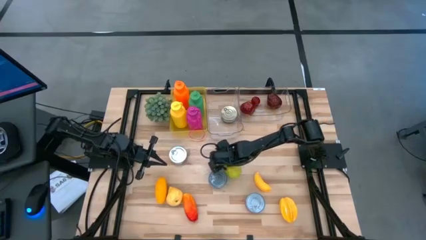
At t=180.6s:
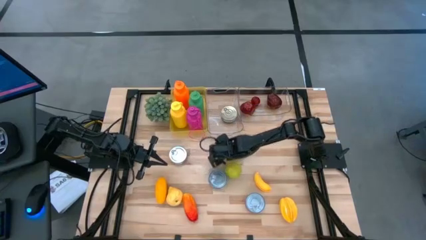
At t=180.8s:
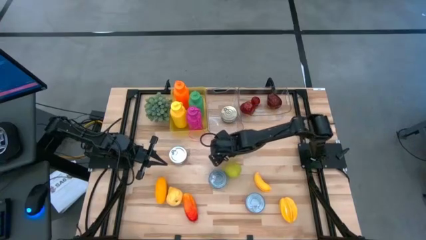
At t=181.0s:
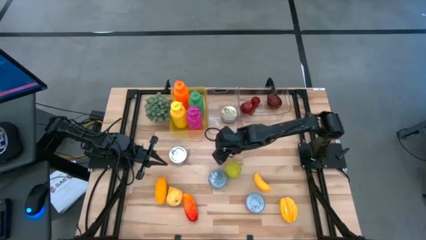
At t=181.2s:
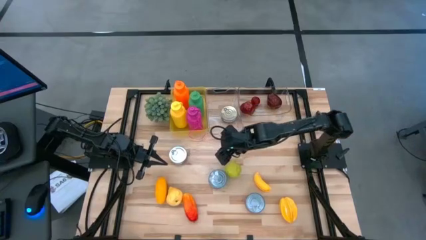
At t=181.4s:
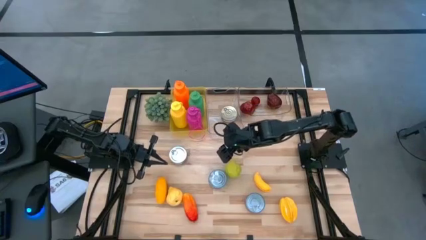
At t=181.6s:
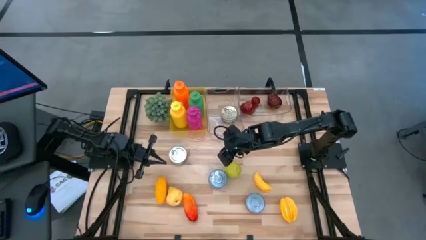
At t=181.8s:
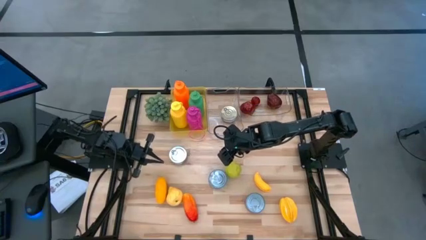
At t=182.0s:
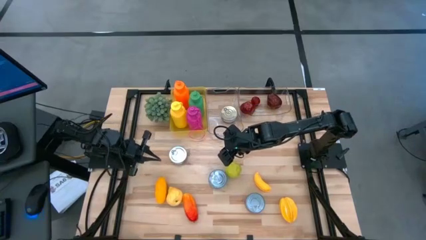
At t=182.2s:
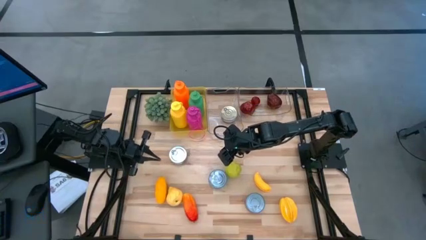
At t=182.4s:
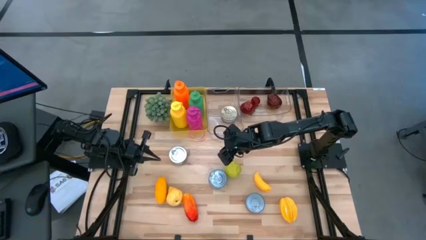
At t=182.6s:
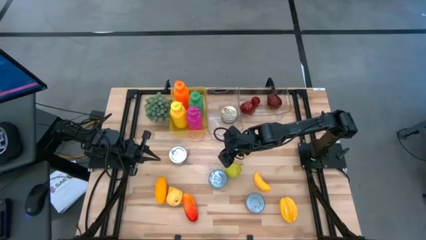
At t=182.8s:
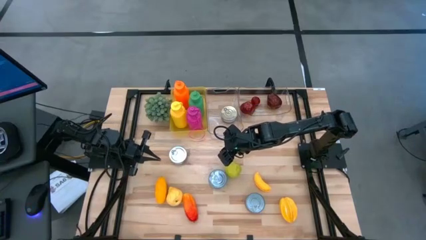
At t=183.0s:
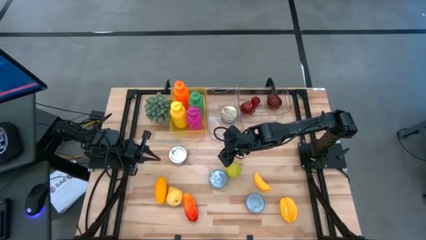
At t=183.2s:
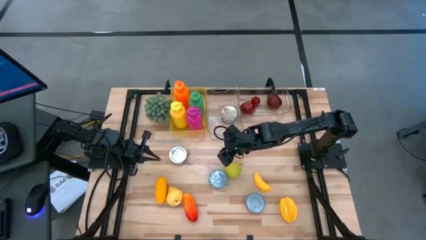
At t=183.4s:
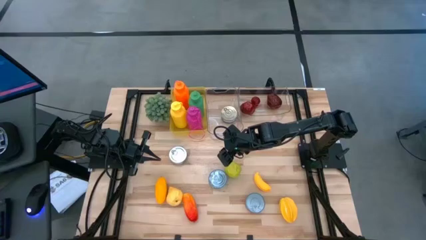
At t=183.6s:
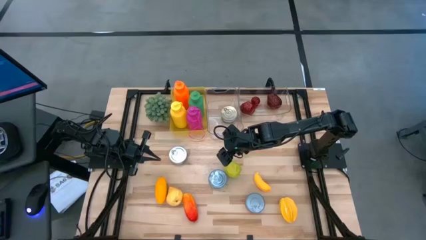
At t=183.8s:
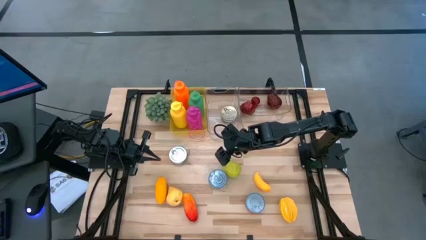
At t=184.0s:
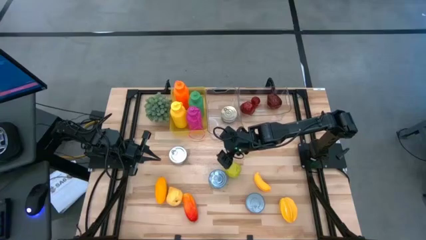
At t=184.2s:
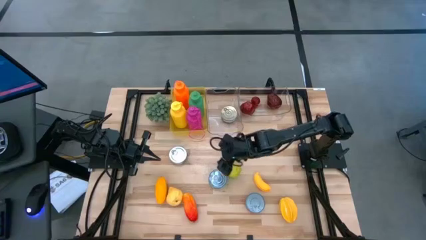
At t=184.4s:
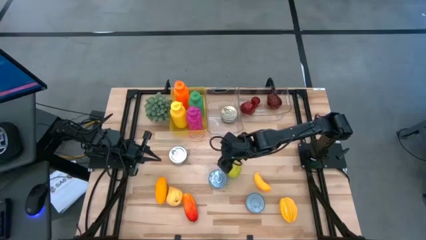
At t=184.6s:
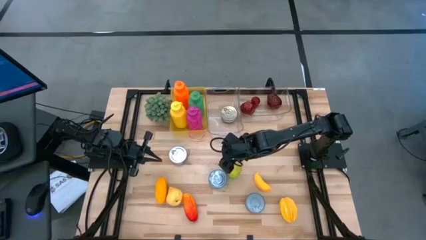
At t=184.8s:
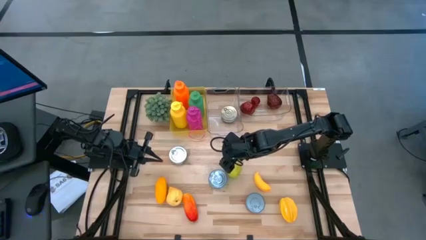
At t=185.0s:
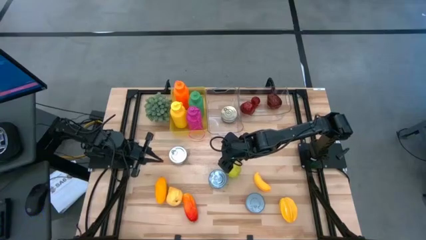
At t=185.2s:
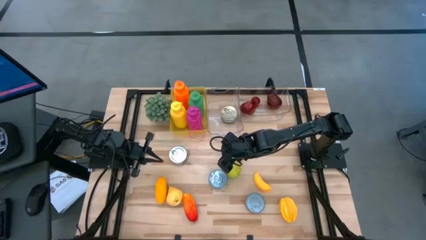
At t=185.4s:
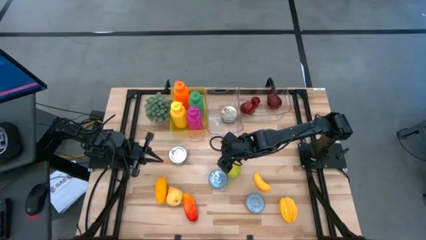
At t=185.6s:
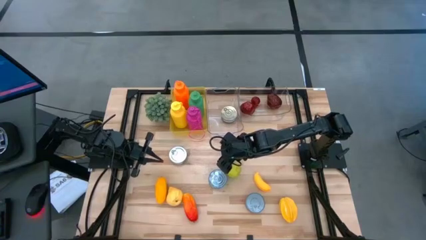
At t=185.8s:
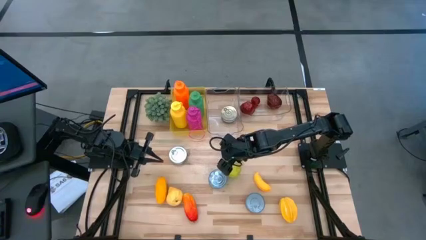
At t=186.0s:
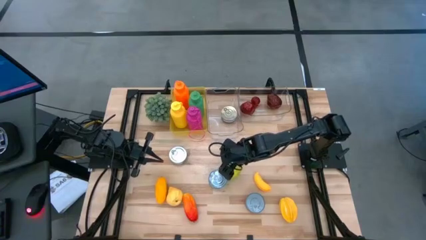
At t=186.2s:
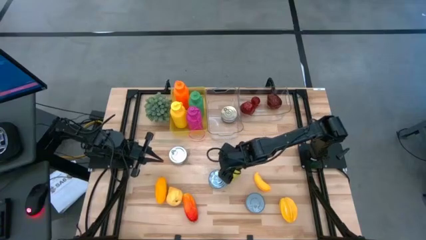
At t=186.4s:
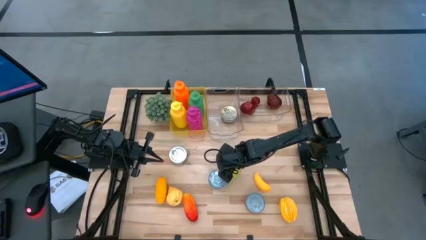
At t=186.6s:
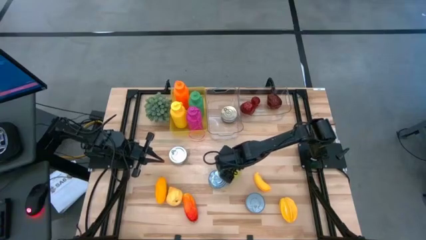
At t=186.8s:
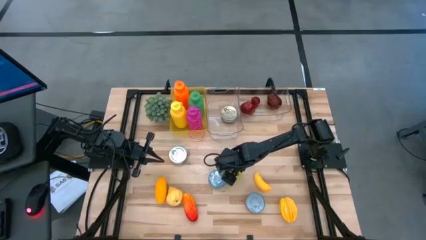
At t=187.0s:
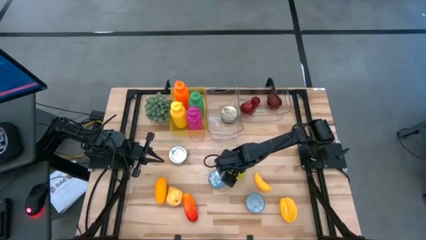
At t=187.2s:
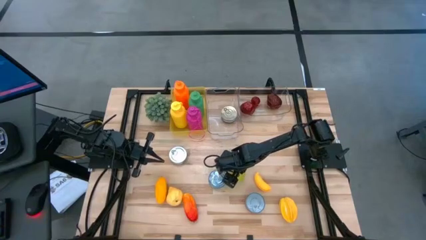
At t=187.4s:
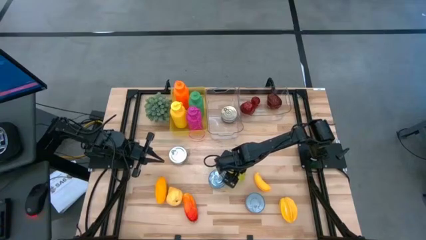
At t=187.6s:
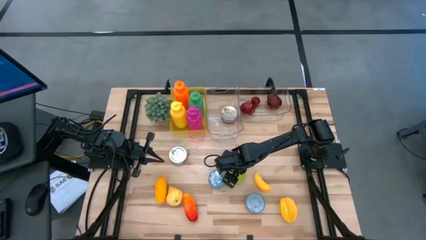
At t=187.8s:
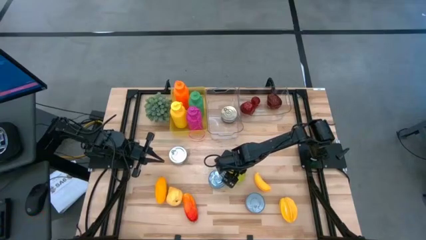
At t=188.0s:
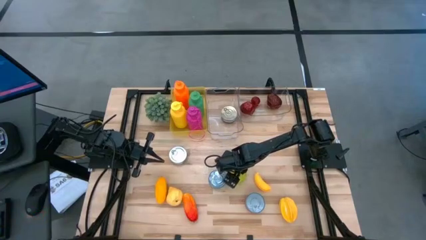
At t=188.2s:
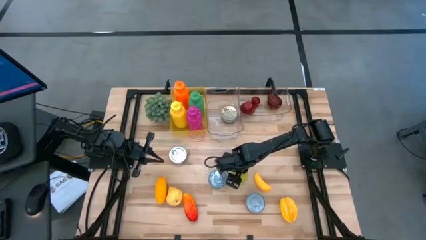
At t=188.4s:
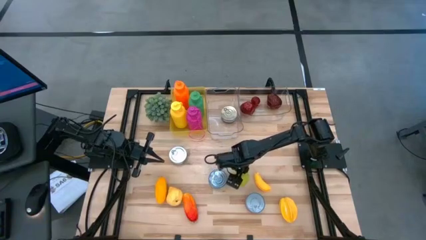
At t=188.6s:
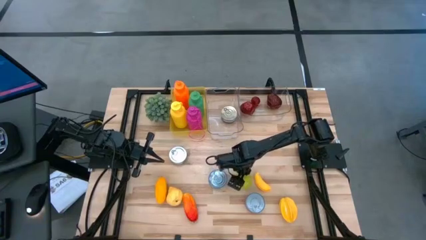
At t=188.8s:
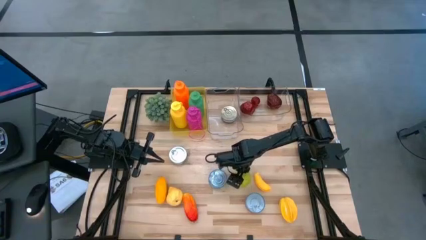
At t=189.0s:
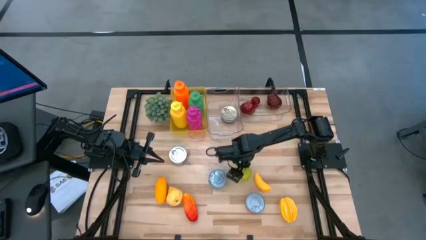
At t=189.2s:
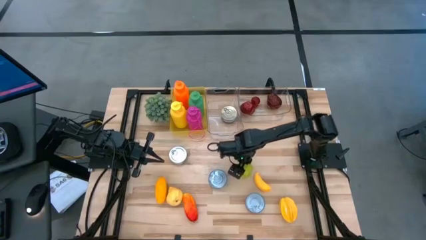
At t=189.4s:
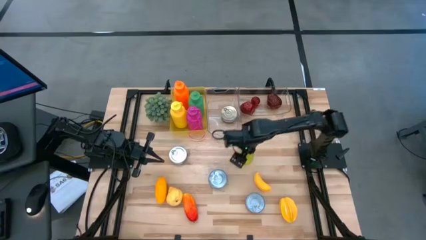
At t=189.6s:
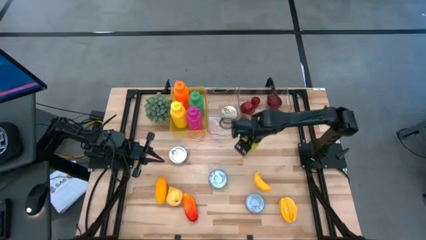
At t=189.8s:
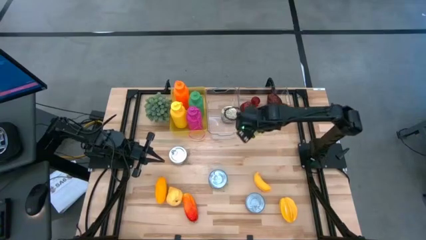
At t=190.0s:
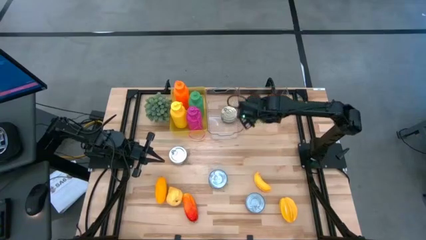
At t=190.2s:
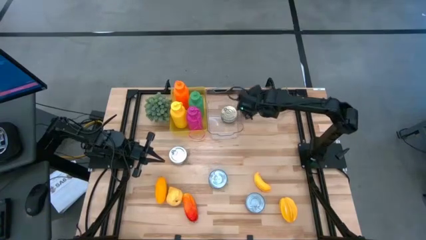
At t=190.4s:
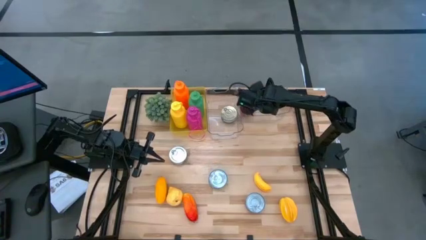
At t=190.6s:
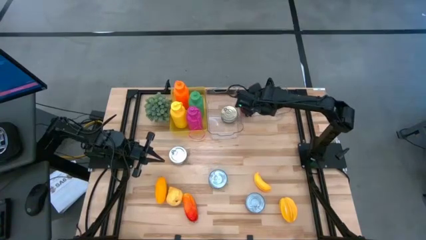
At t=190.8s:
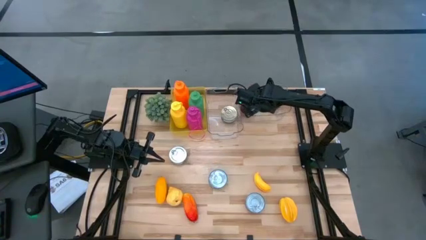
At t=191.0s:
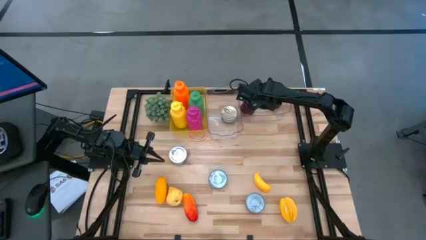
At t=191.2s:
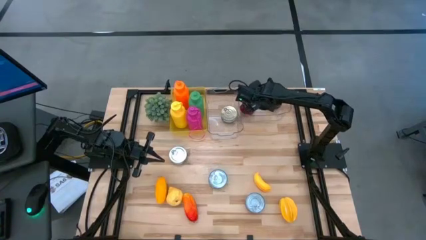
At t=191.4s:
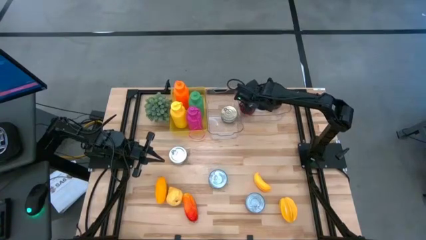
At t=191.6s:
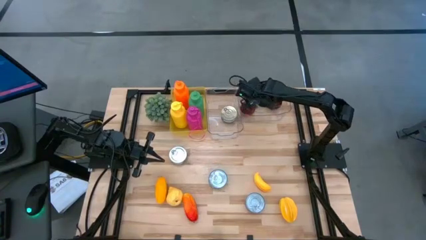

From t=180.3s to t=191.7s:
Task: Pick & Place Food Item
Put the green apple into the right transparent bin

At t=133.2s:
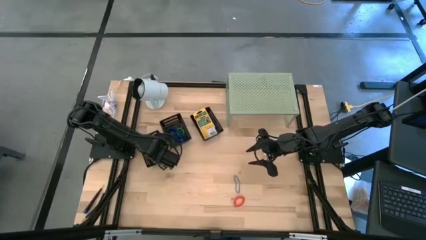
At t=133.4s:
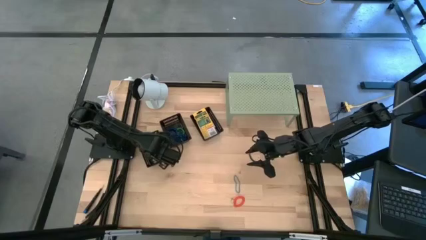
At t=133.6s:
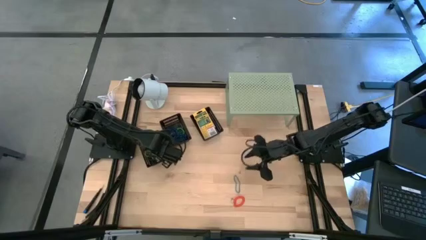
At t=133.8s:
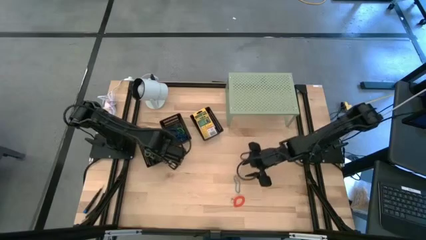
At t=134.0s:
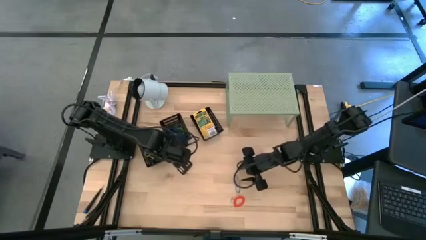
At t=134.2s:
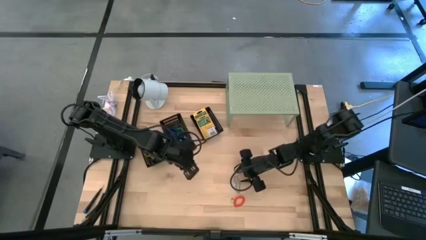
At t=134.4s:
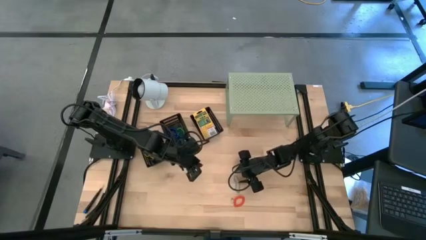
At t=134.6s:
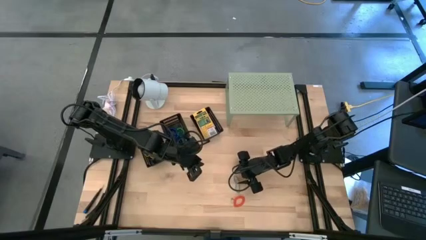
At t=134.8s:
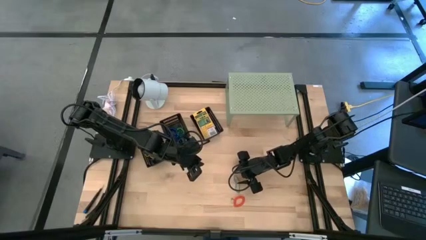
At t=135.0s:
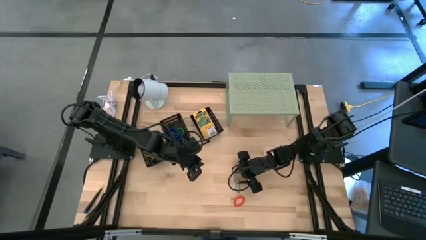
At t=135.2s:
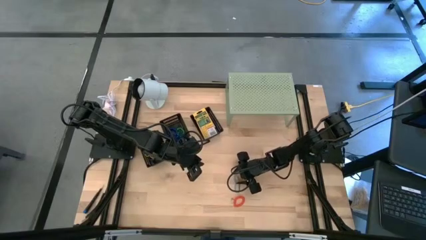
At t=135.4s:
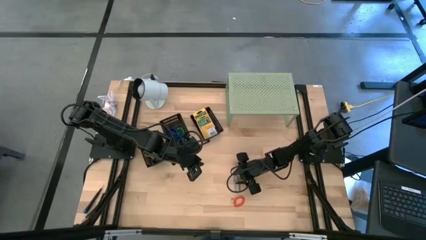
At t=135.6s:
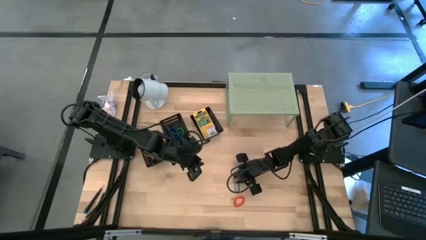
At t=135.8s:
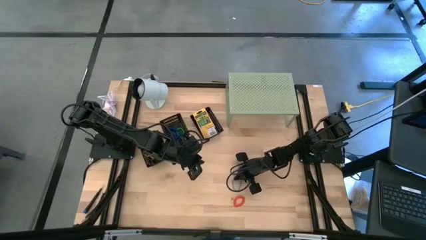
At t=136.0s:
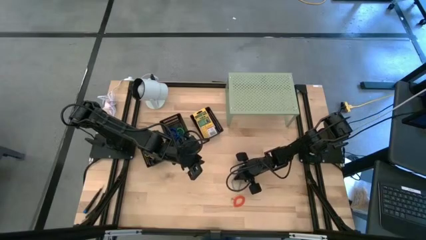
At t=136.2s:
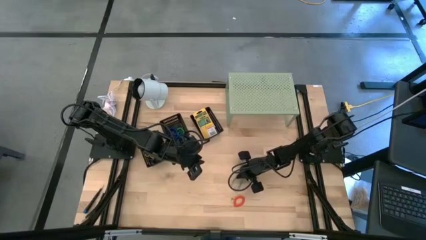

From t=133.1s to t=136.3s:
Task: Pick & Place Office Desk Supplies
Put the blue rubber band into the left black basket
